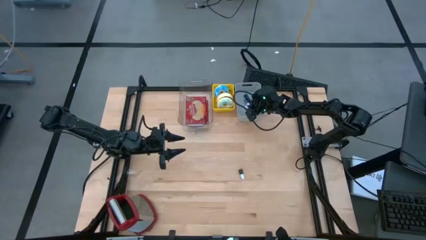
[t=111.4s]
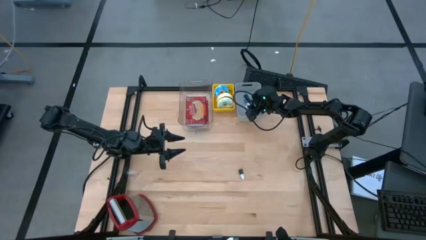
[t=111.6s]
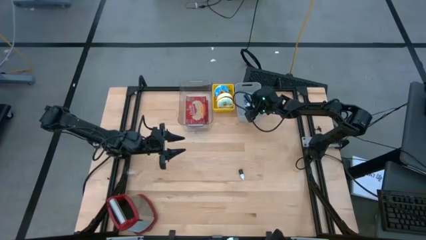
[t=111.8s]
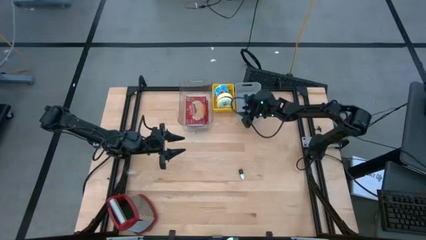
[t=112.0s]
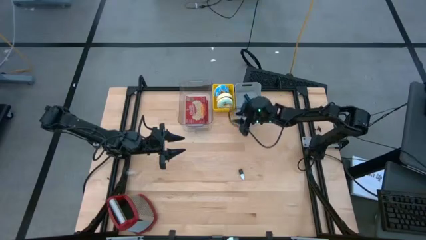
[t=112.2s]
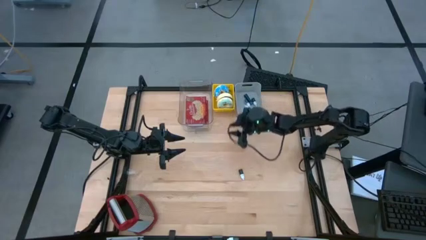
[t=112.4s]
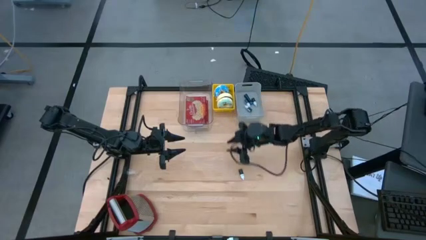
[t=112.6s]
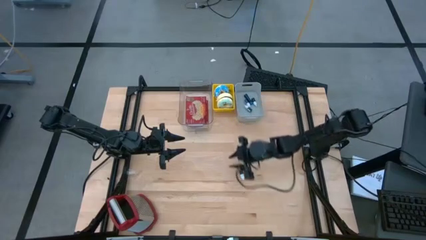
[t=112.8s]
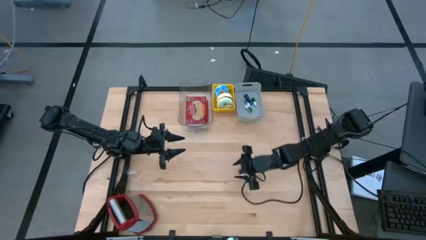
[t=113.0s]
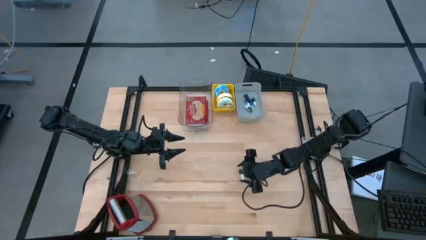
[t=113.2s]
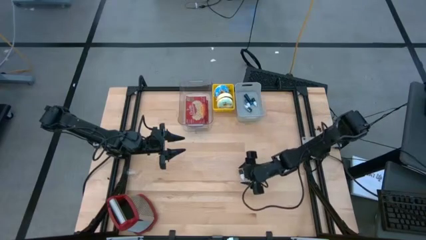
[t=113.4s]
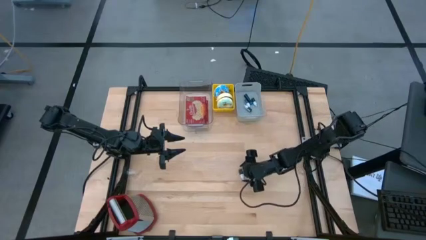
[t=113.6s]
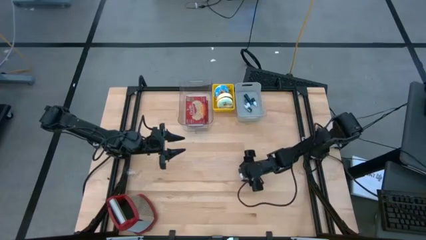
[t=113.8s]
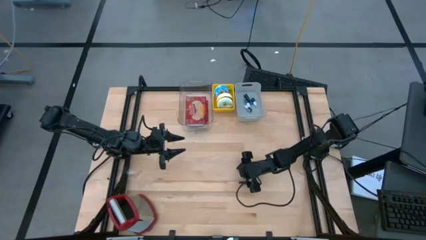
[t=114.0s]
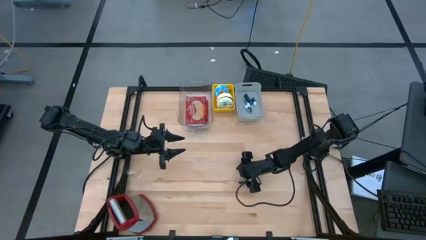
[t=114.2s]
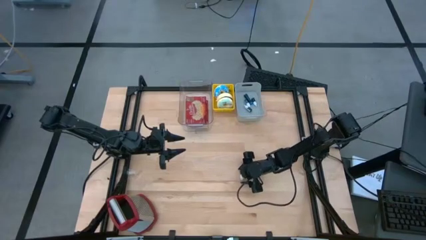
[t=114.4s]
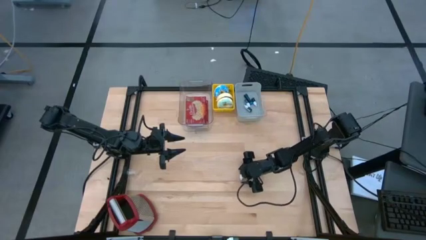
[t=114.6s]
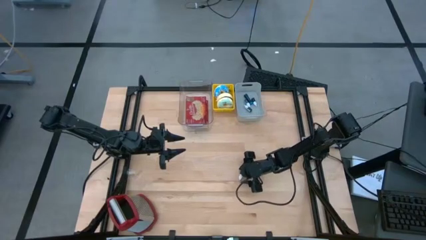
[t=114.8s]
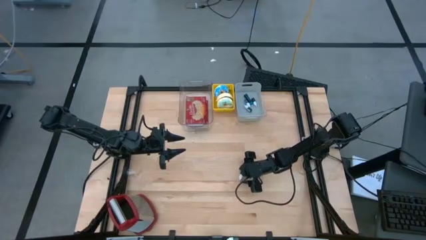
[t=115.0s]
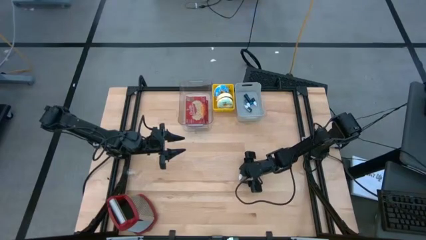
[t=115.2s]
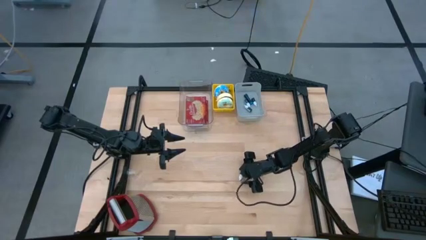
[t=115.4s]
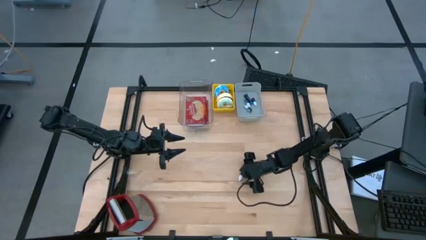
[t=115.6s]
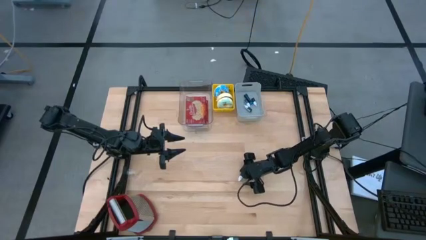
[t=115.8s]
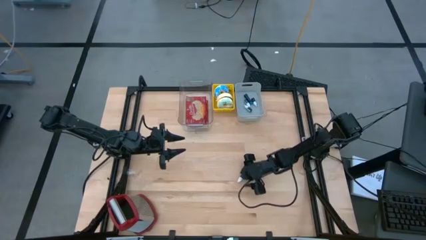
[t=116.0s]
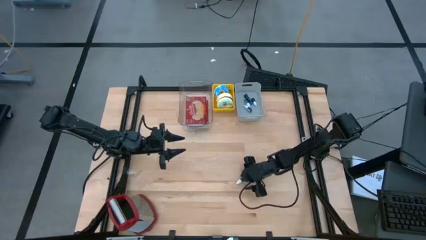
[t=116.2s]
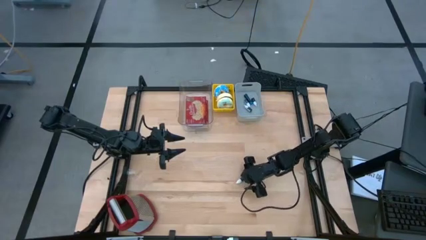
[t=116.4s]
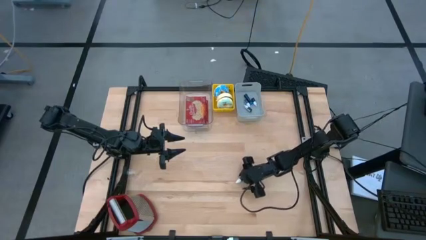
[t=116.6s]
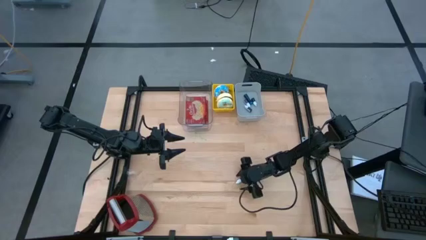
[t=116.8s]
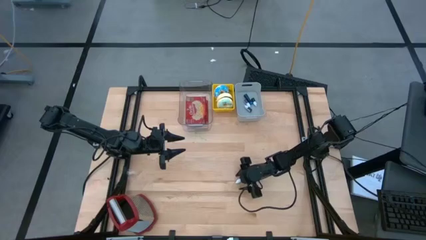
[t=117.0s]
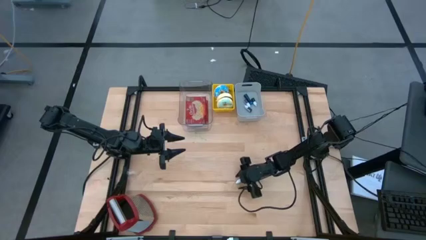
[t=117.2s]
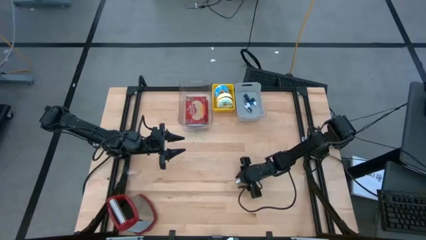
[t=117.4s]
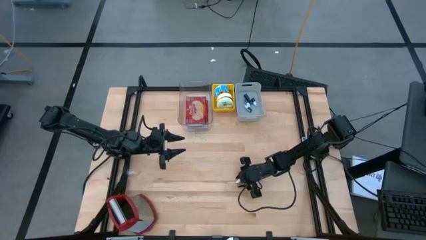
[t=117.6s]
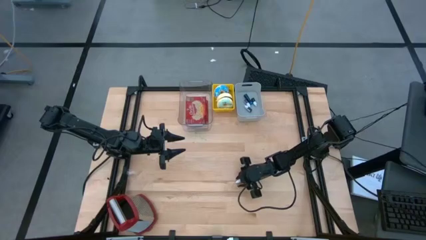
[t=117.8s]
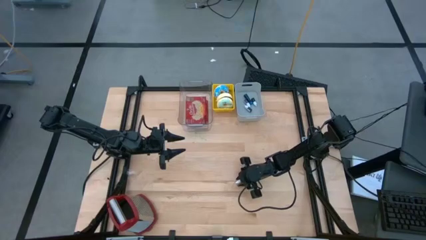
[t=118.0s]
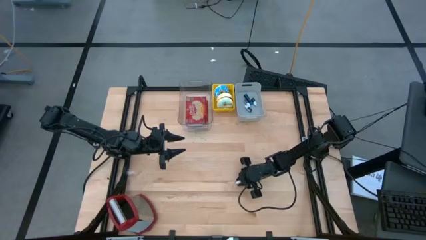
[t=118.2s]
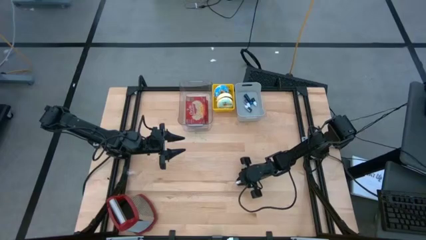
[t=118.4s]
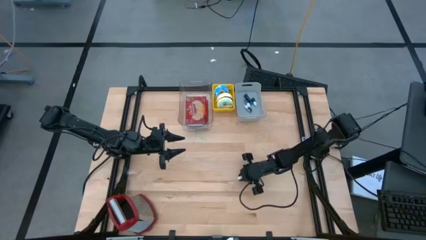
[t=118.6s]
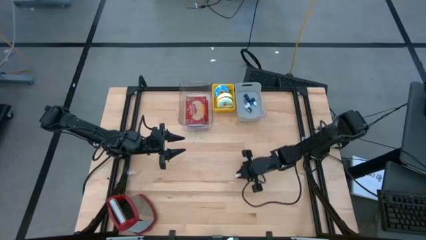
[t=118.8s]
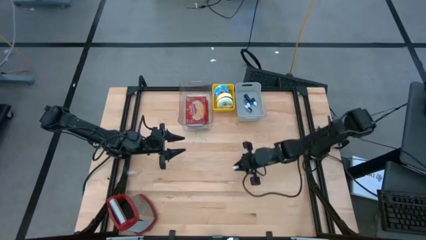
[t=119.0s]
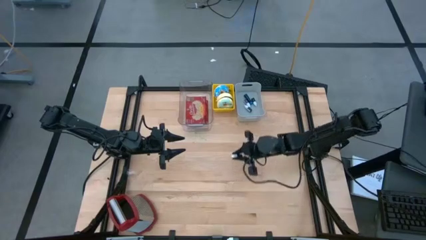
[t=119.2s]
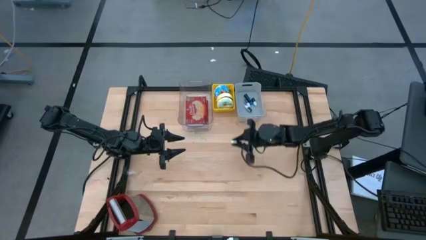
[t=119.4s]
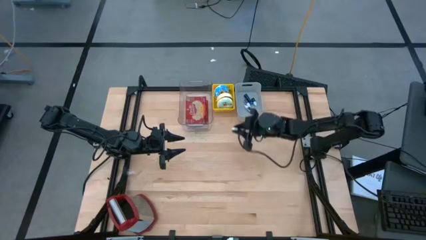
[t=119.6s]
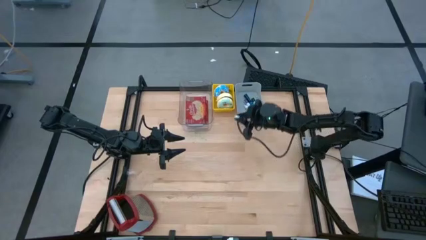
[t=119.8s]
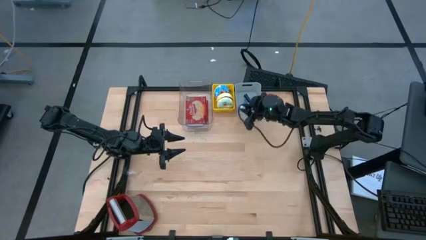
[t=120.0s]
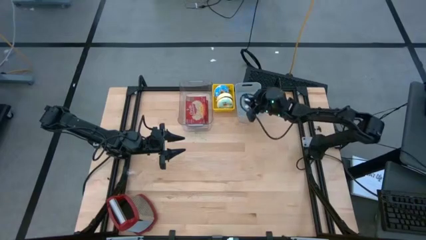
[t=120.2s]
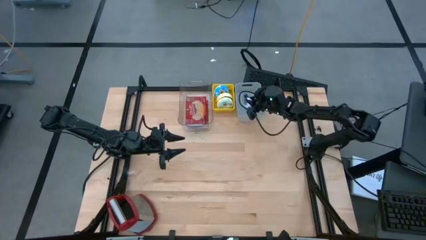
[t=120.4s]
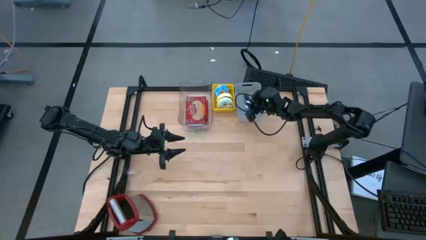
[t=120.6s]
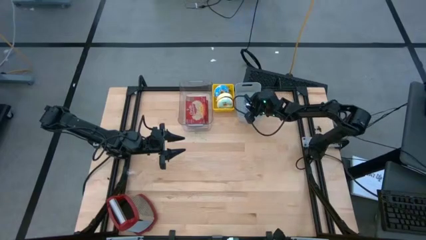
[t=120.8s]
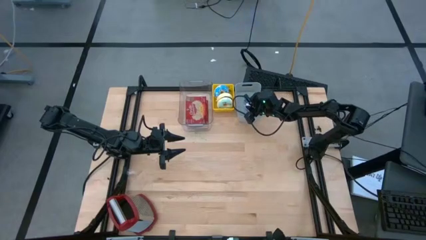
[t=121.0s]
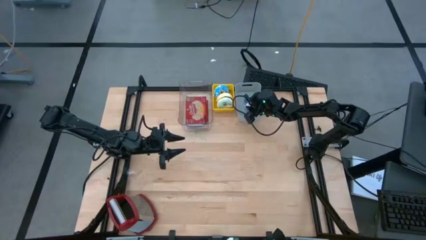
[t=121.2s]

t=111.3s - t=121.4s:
Put the brown food coloring bottle into the grey bin

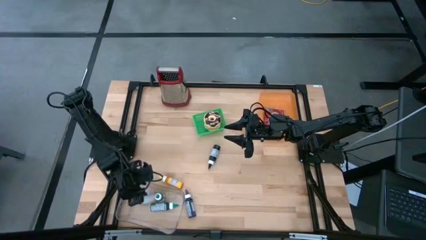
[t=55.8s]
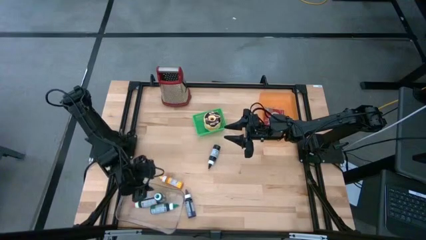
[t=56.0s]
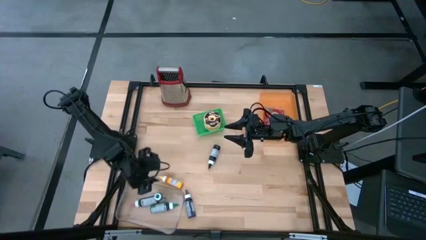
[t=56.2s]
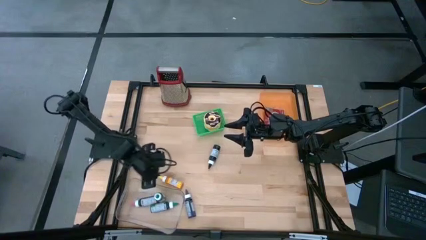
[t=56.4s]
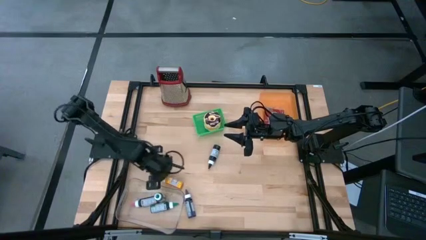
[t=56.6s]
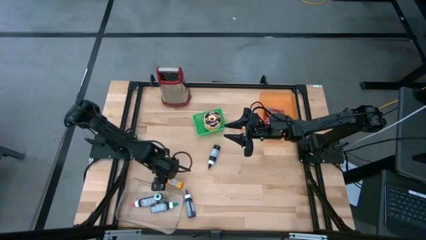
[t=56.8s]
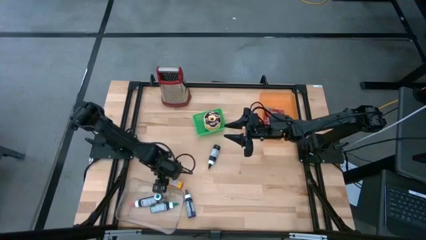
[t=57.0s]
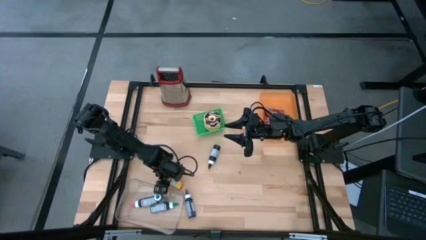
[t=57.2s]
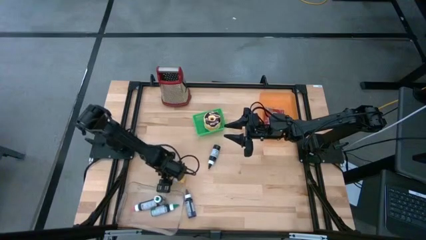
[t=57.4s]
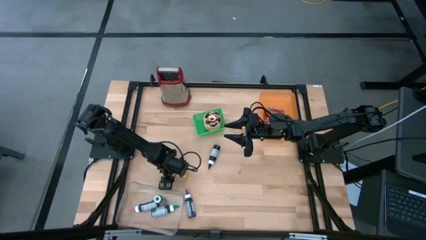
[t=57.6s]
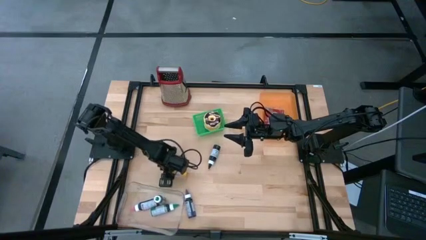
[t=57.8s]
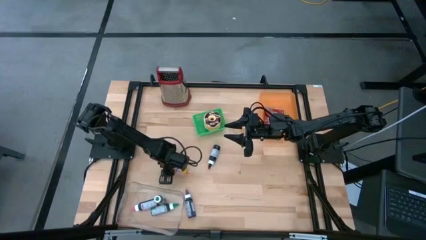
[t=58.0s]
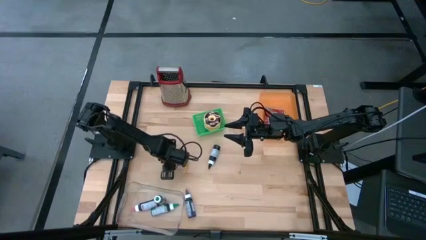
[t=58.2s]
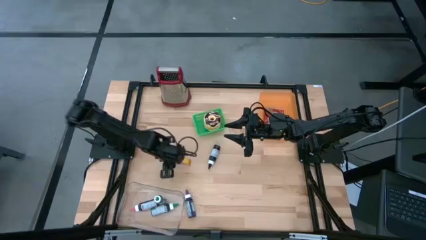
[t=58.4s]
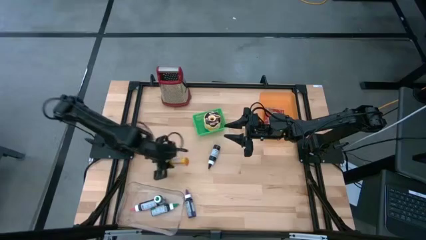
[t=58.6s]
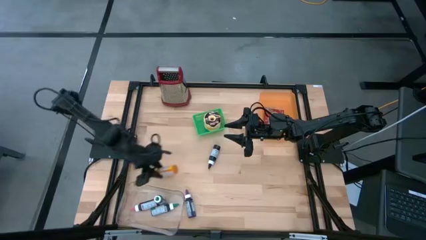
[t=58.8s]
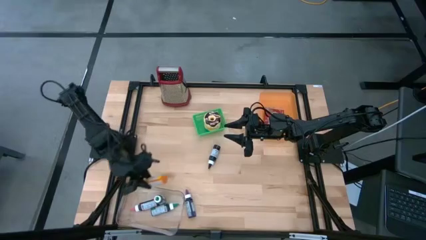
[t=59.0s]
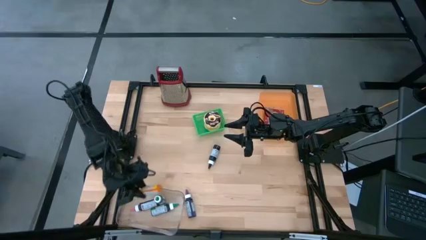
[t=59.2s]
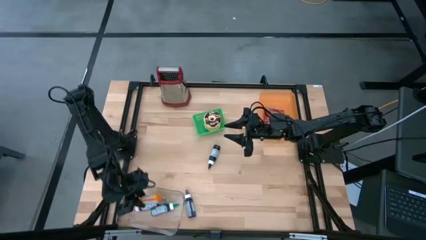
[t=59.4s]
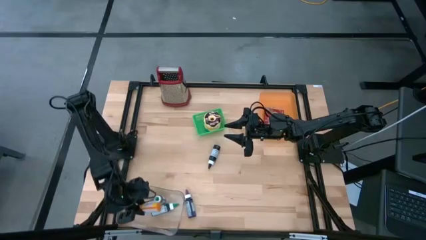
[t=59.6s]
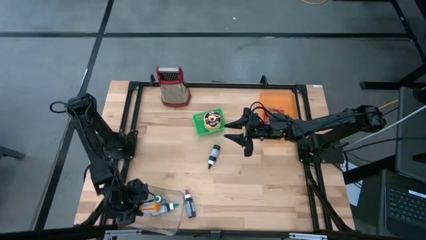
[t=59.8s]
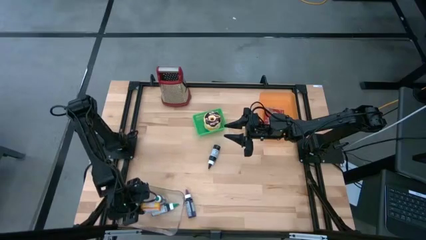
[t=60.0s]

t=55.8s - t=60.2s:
Put the yellow food coloring bottle into the transparent bin
